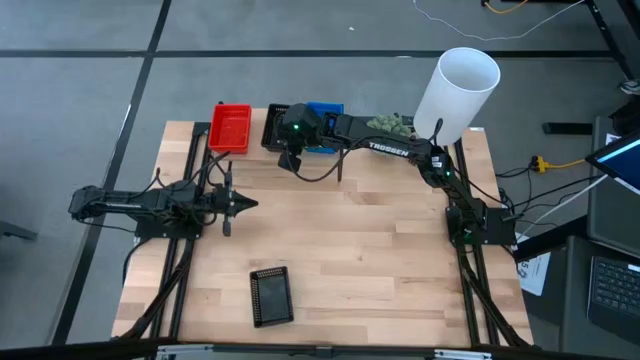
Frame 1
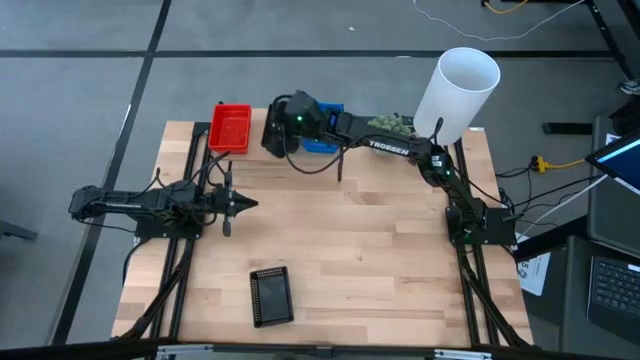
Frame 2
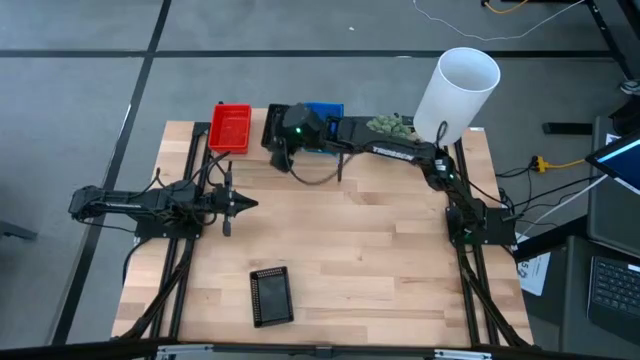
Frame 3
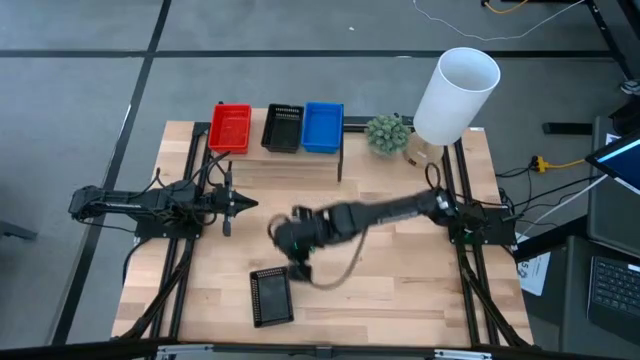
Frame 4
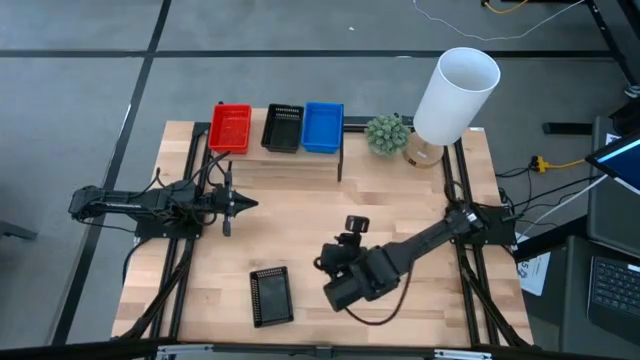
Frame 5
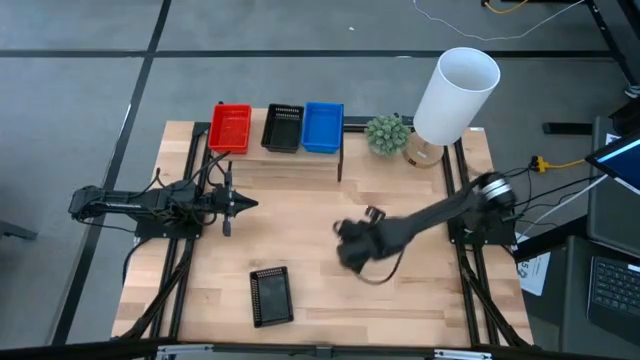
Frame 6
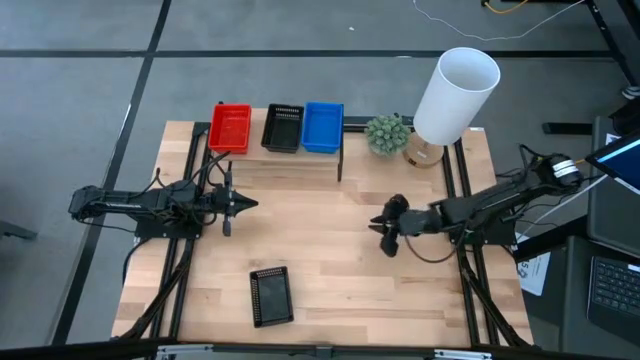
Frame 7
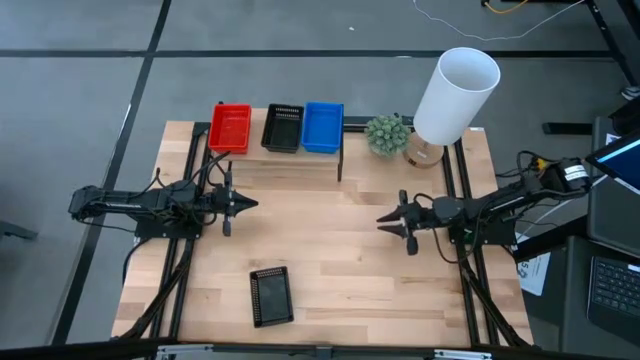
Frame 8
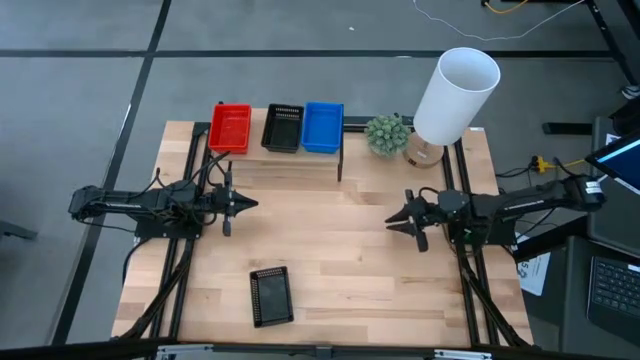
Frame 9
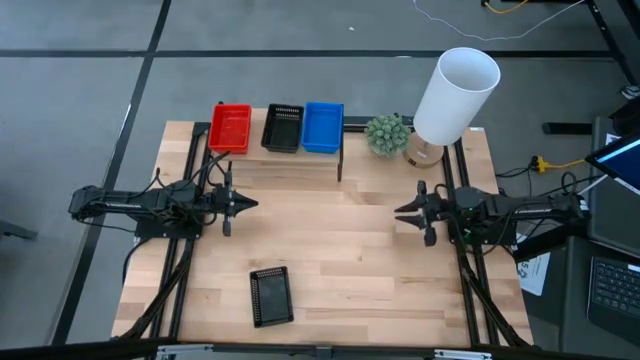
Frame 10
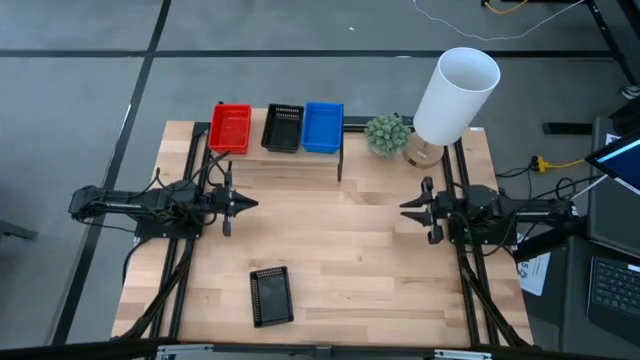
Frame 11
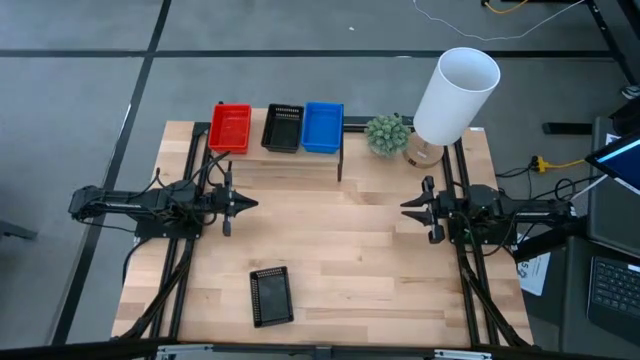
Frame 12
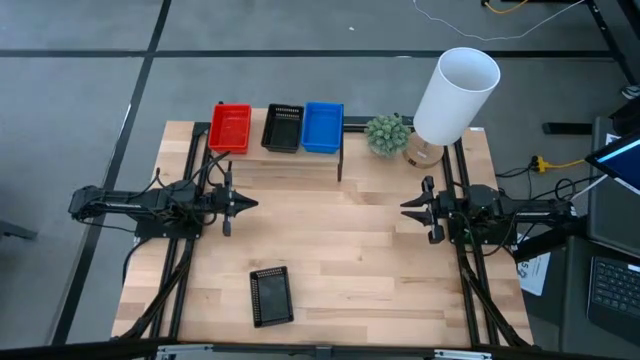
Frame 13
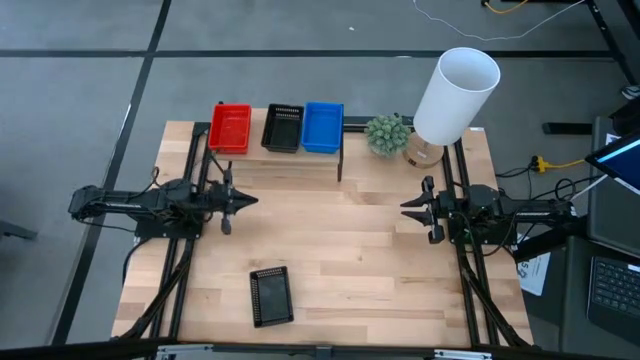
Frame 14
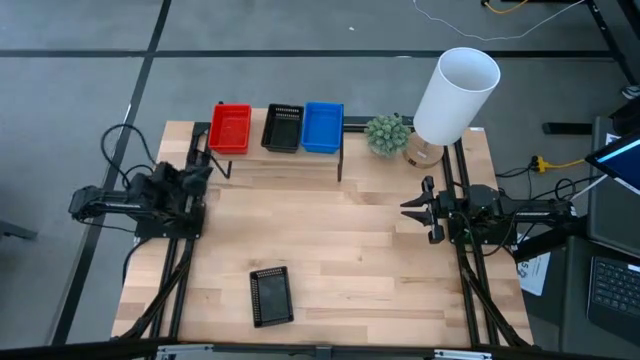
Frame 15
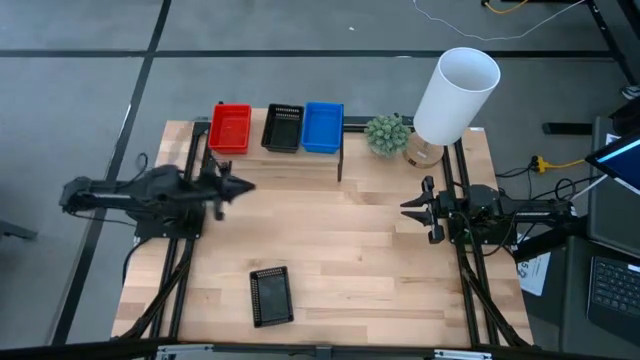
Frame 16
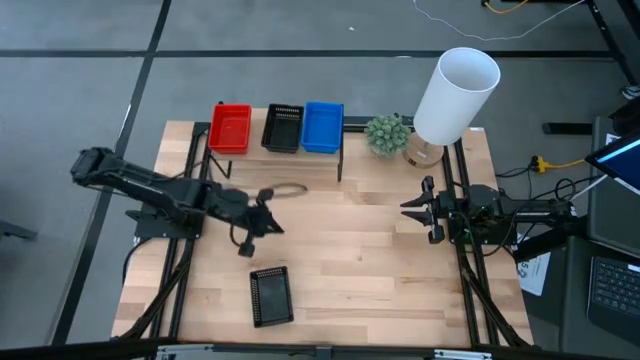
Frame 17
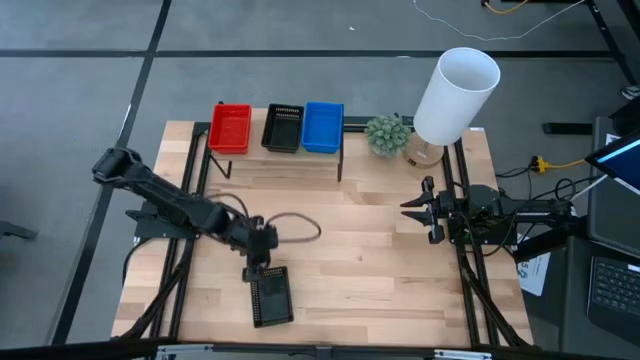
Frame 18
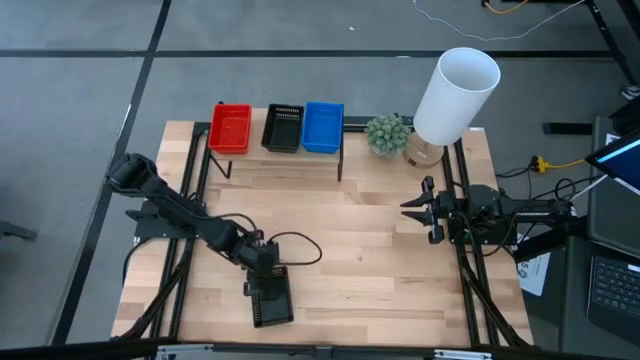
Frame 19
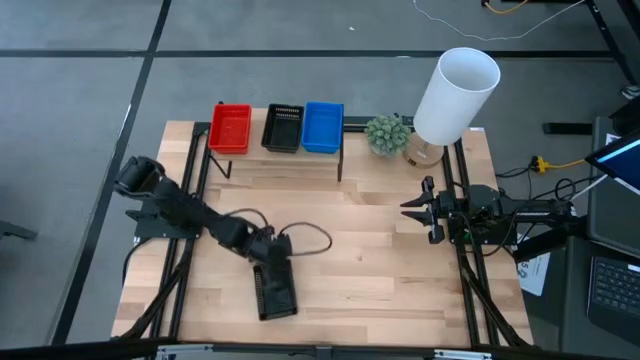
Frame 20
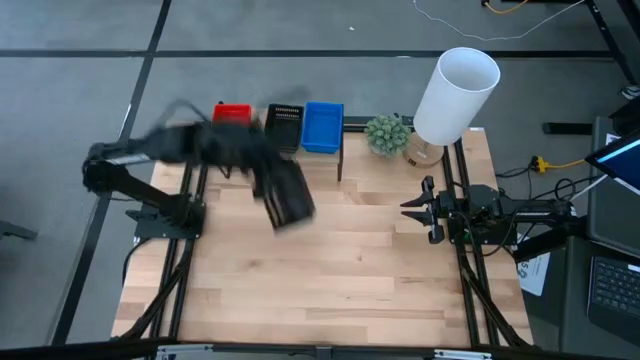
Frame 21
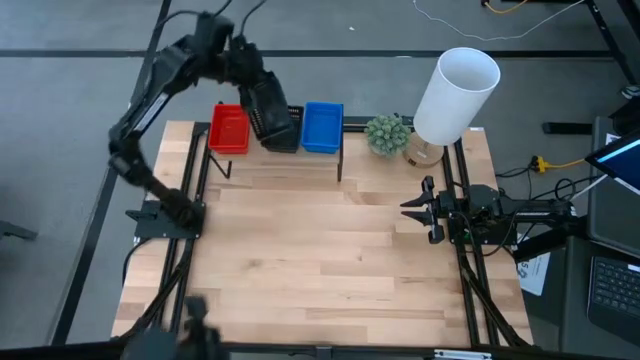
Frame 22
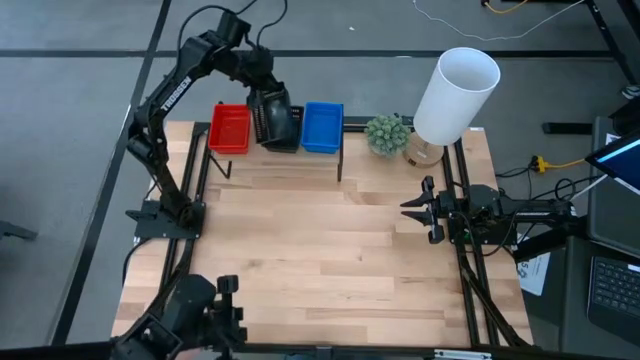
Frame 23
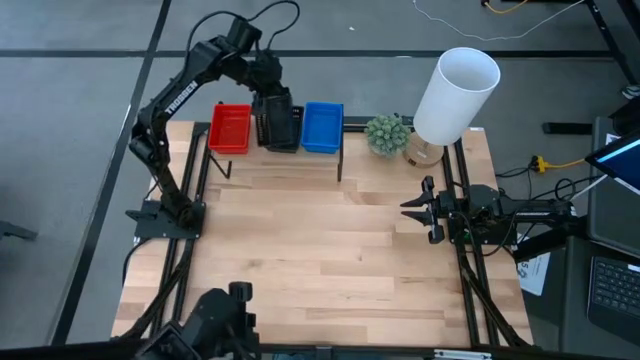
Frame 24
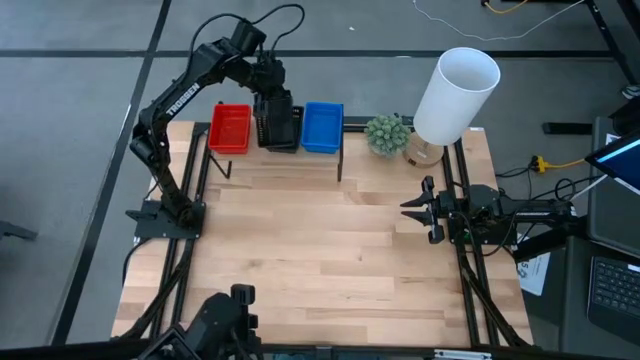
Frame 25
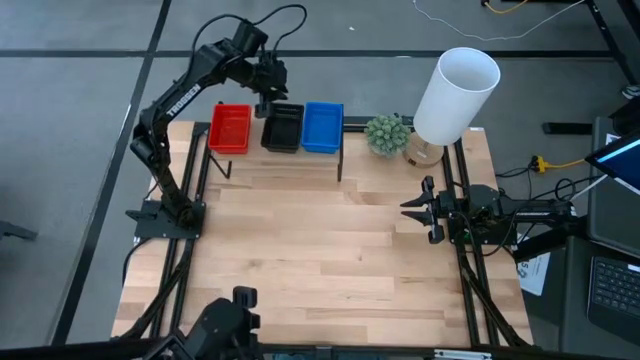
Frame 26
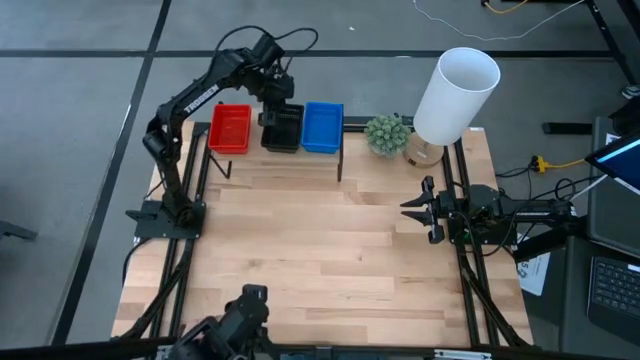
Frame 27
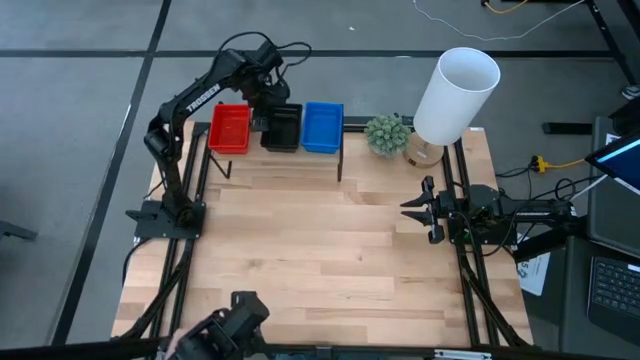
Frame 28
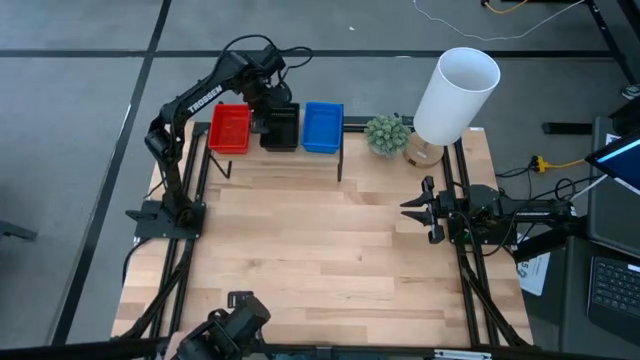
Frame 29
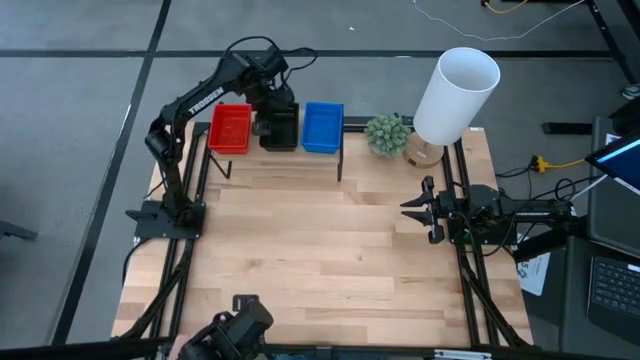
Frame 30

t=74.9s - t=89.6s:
Task: Stack baskets on shelf by color
Stack the black bin on top of the stacked black bins on the shelf

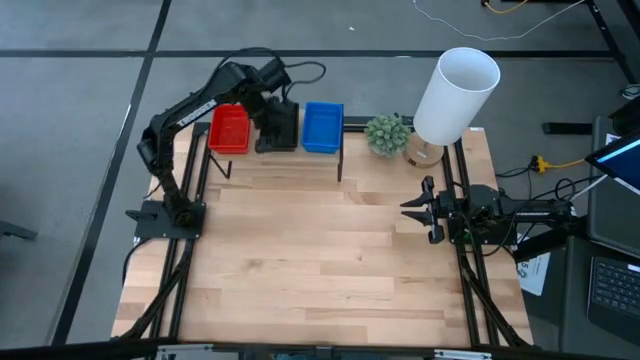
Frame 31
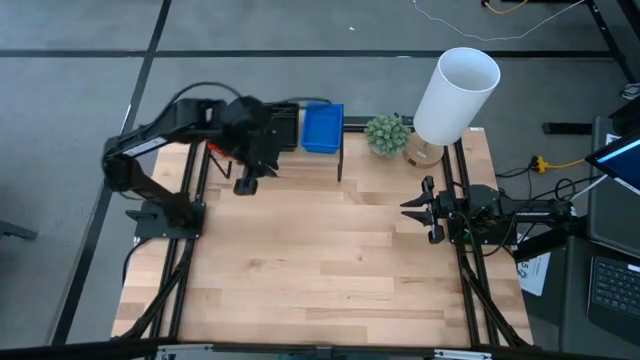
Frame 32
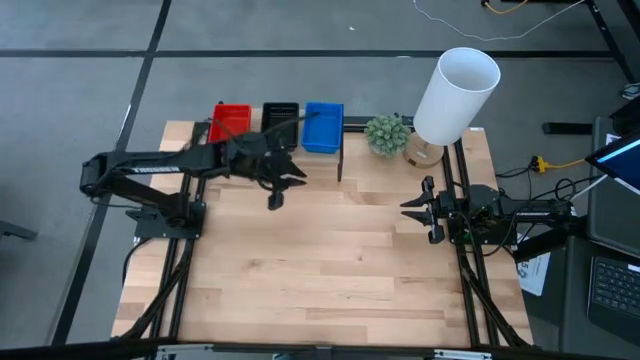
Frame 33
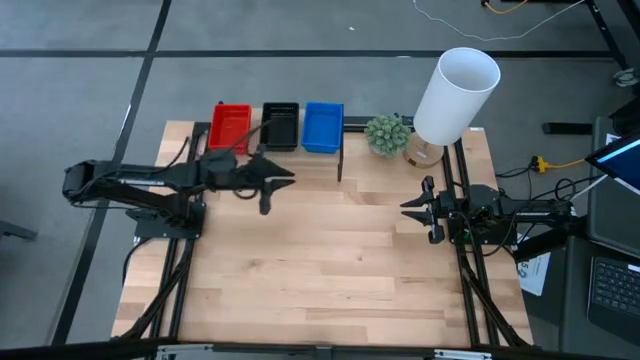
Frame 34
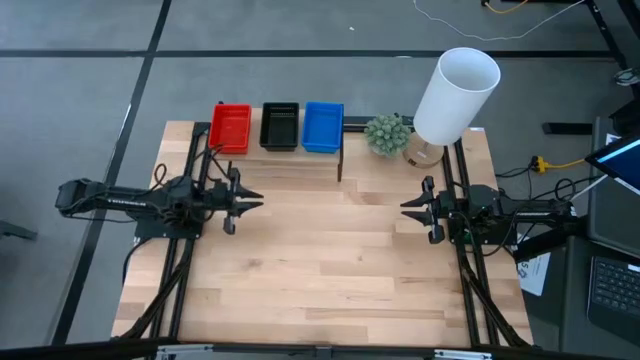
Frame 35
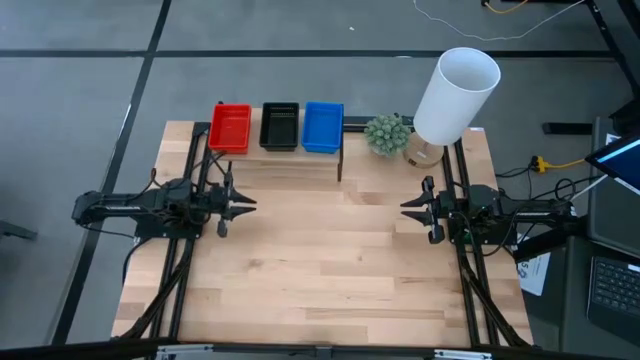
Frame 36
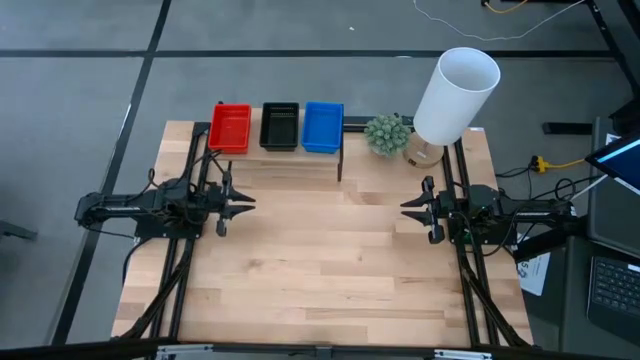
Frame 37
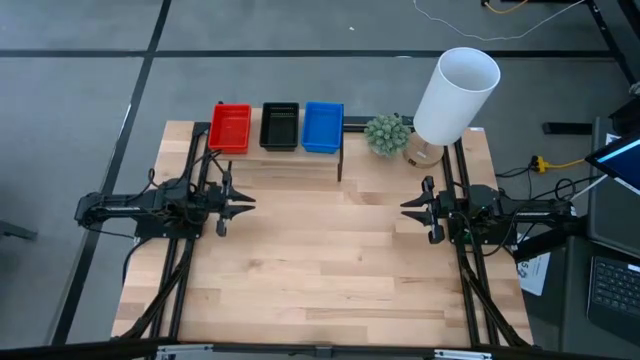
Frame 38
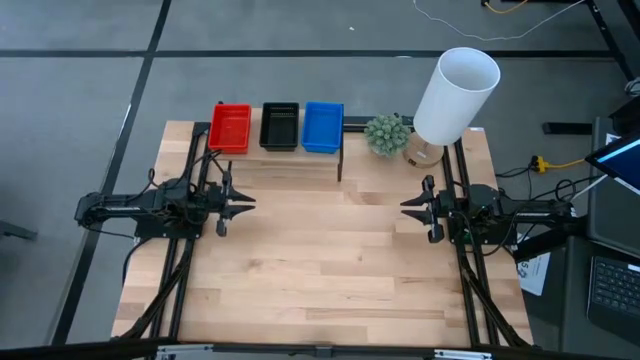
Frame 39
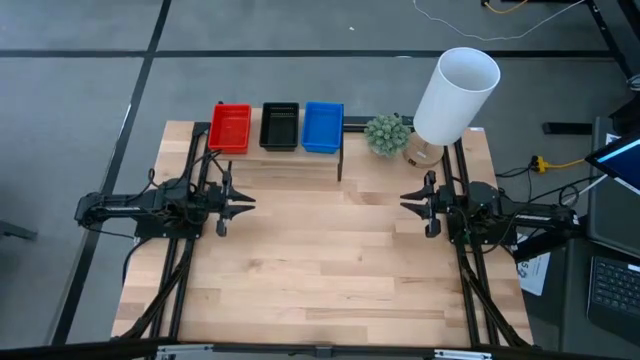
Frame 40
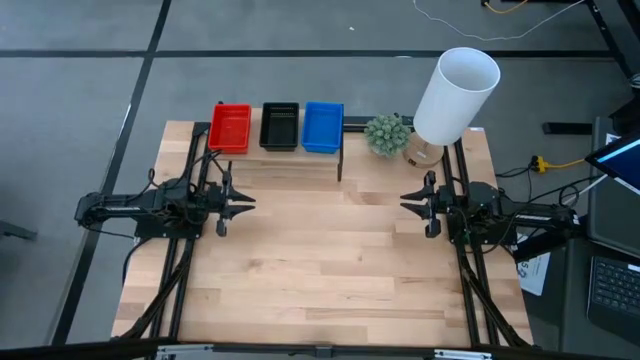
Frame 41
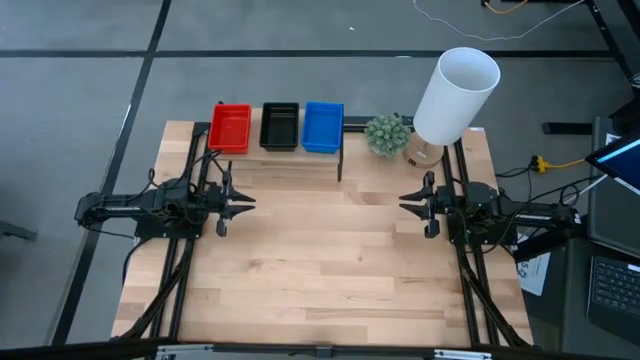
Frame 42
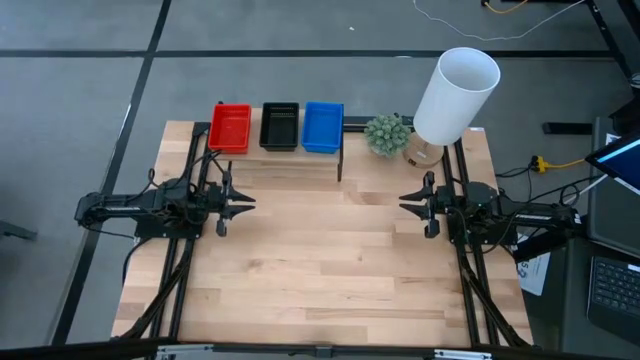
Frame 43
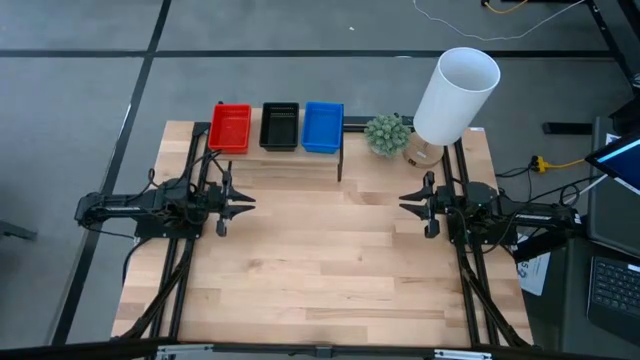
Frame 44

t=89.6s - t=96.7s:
Return to Home Position

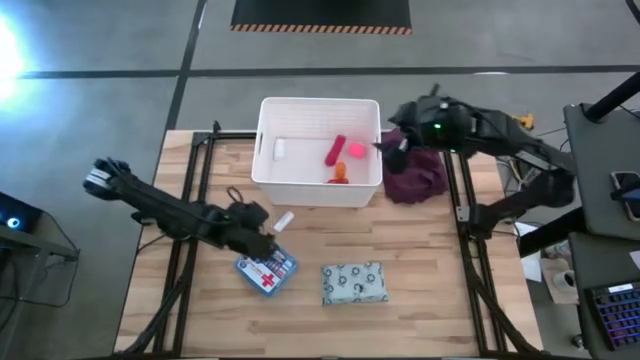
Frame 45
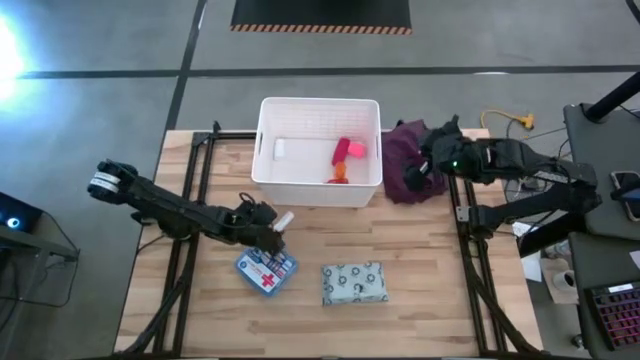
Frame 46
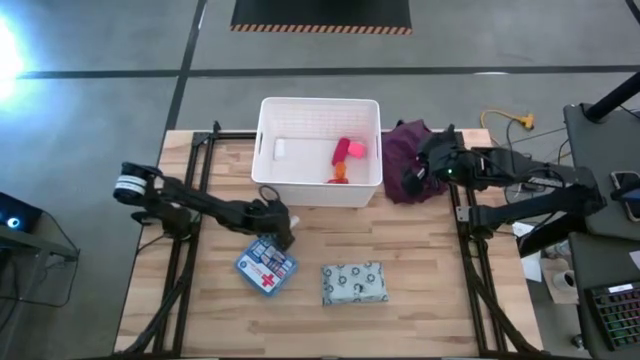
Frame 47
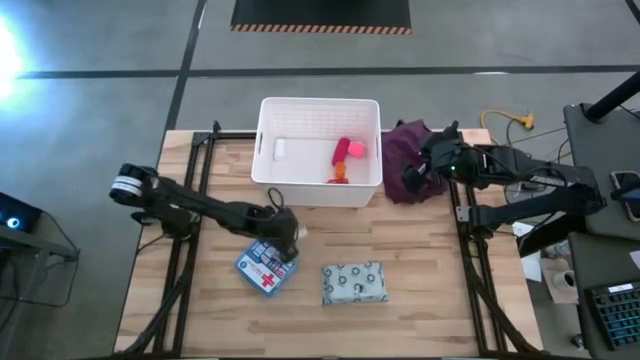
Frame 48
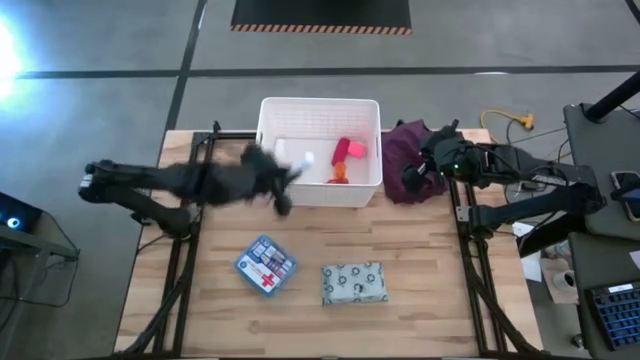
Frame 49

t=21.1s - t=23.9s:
Task: Pick & place medical supplies in basket/bin
Put the rolled gauze into the white bin
